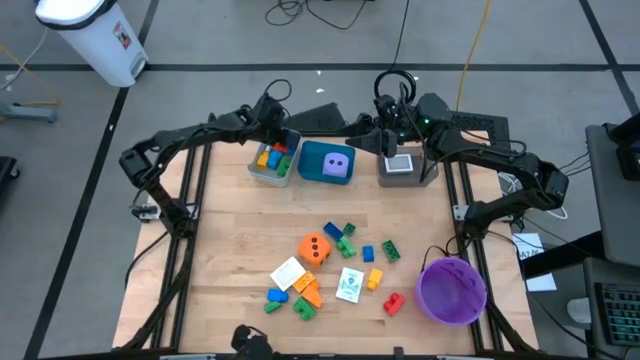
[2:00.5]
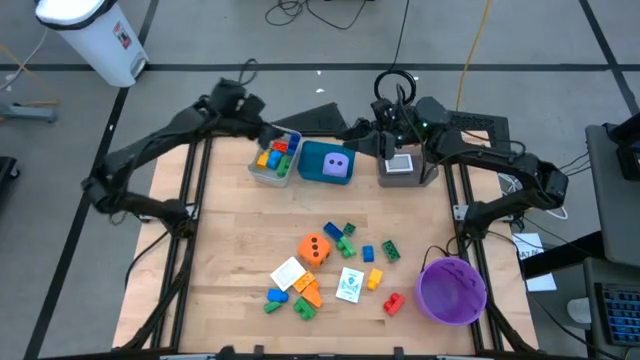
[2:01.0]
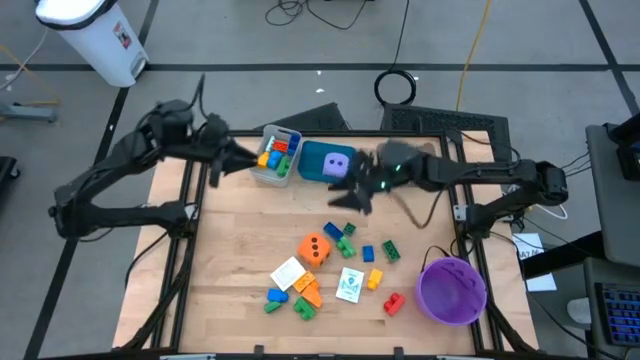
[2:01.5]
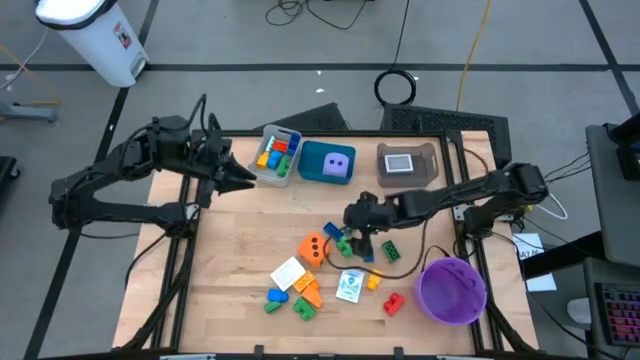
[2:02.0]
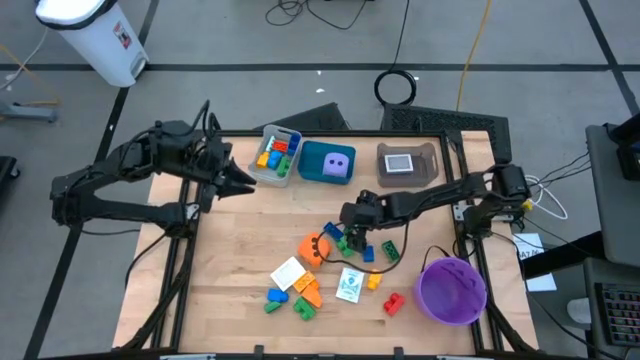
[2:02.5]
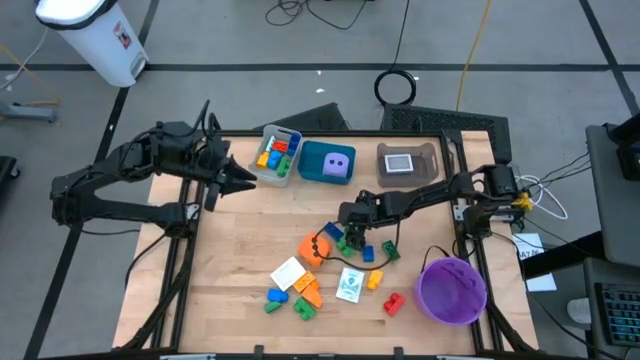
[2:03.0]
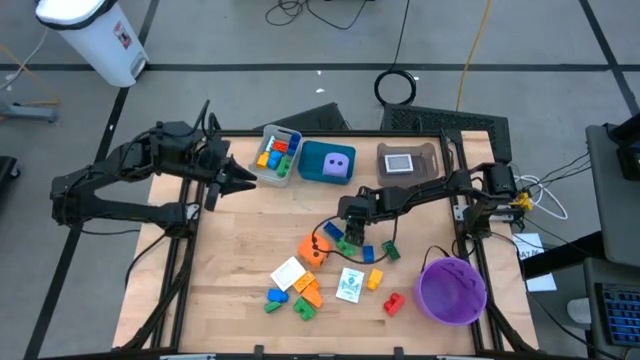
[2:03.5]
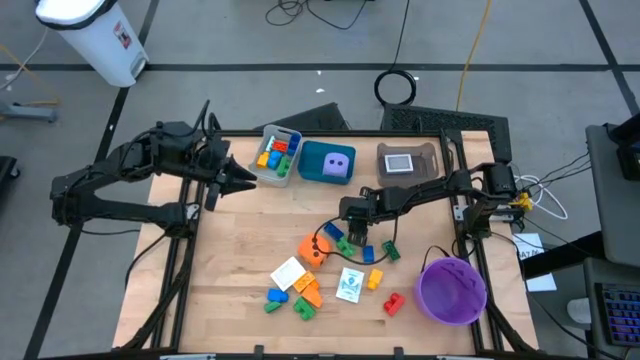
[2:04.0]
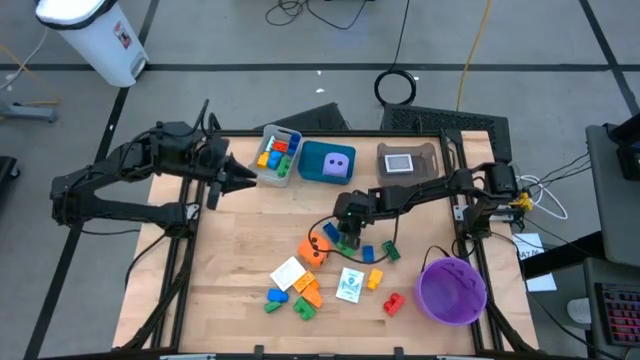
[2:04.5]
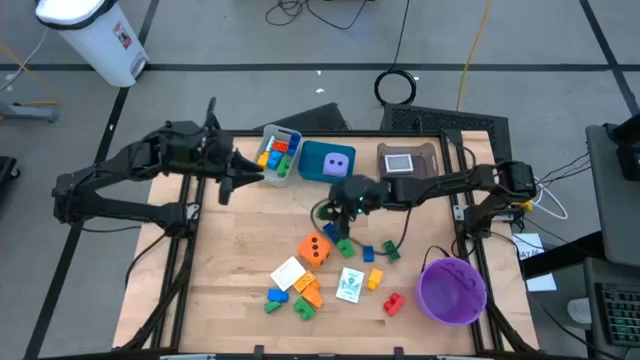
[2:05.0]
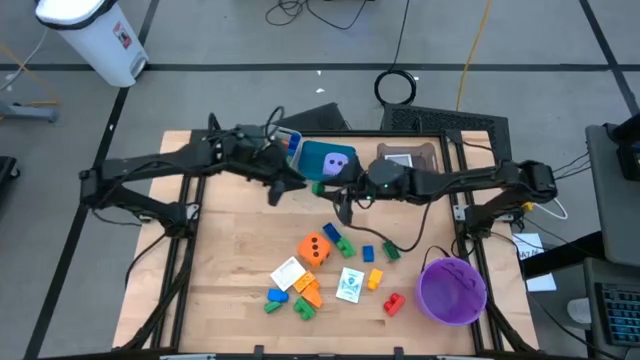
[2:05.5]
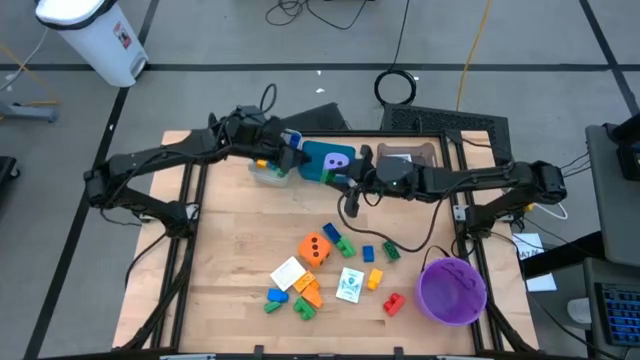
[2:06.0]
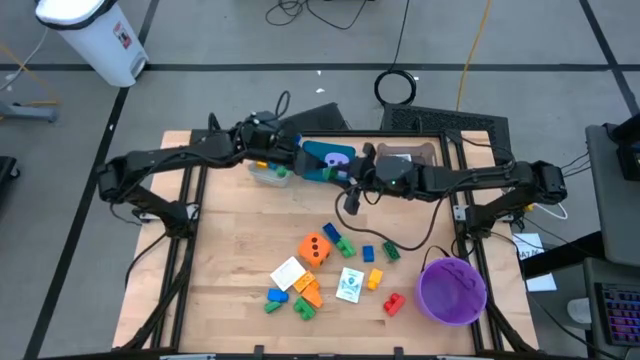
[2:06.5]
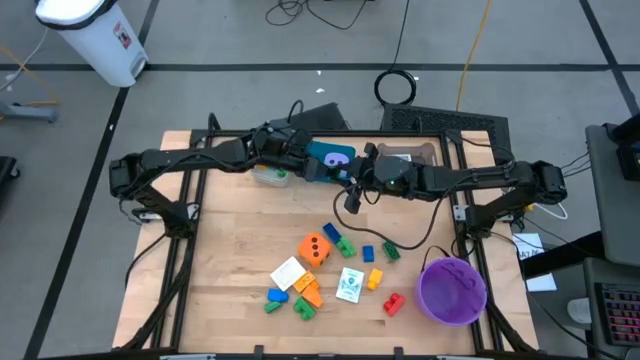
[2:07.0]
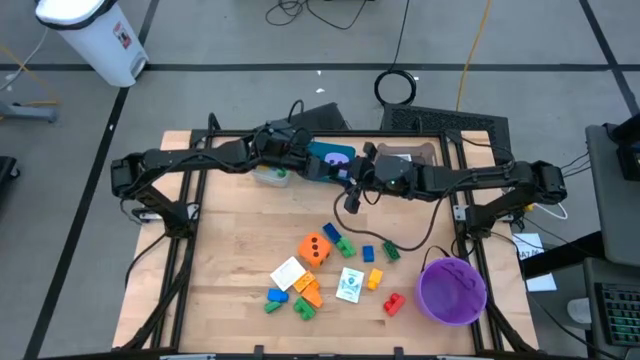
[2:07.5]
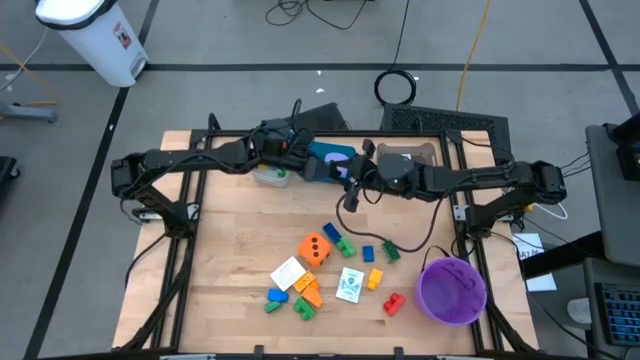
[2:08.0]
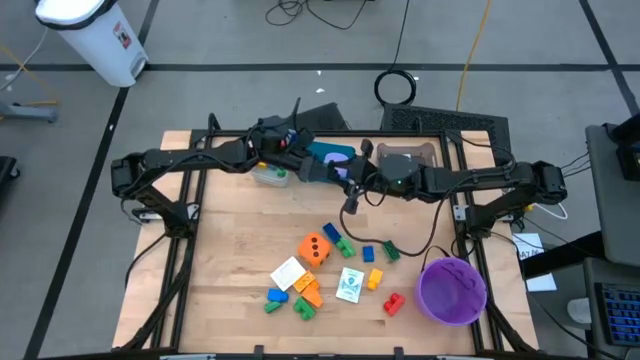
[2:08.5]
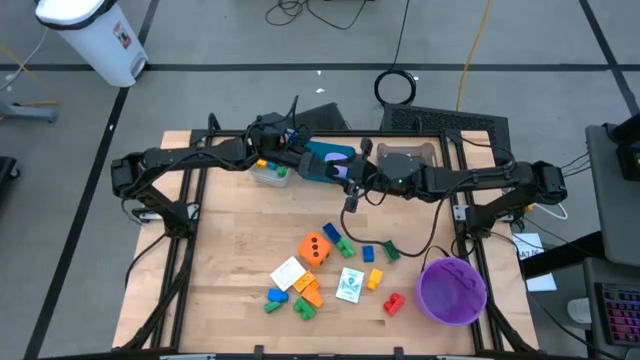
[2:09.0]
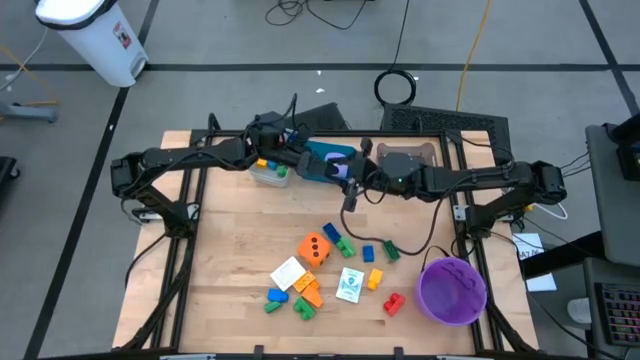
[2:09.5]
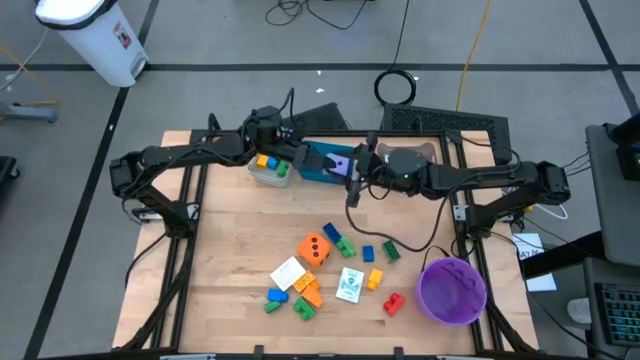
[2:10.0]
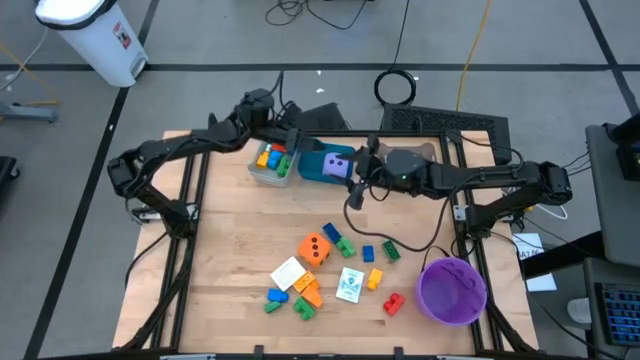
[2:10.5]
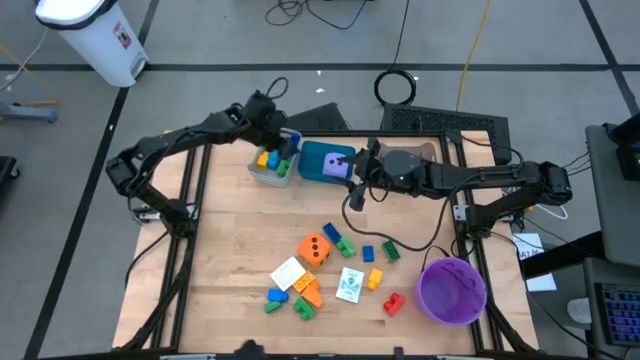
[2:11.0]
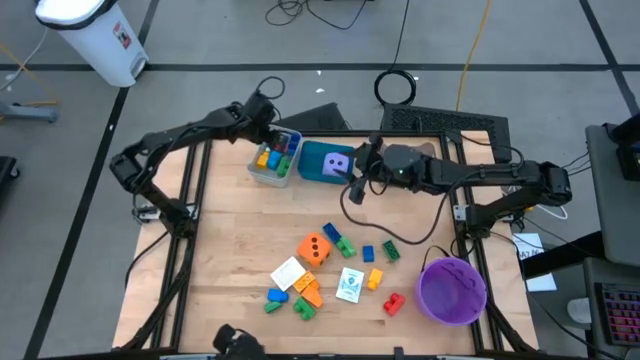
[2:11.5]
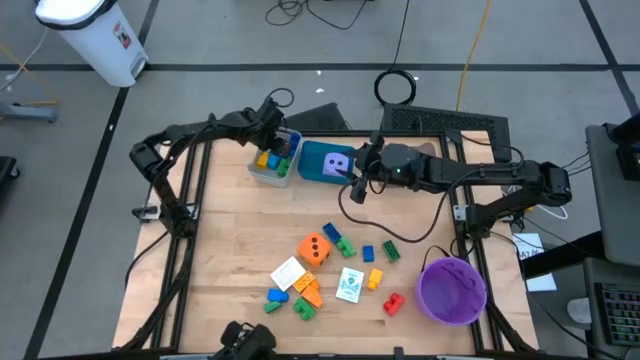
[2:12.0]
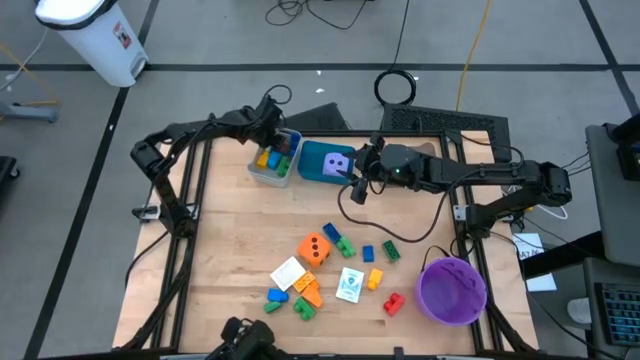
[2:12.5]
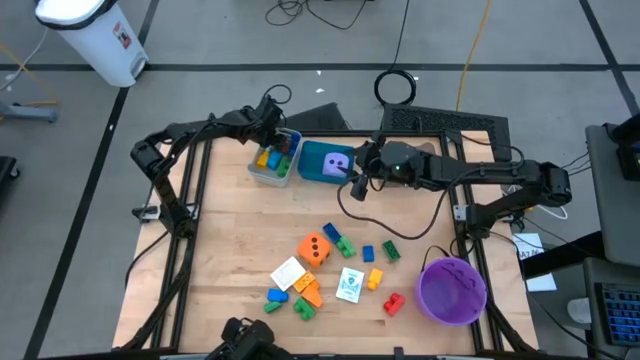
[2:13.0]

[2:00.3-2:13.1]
Task: Pick & Place Toys
Put the green game piece into the gray bin

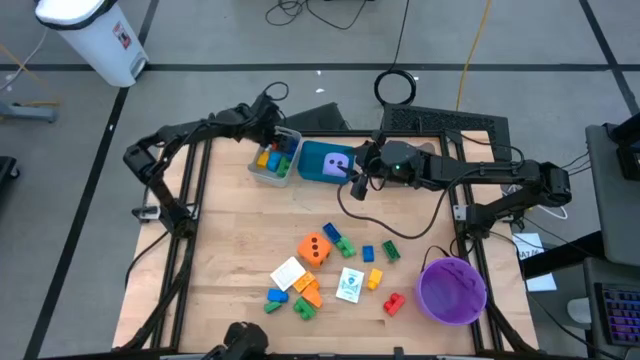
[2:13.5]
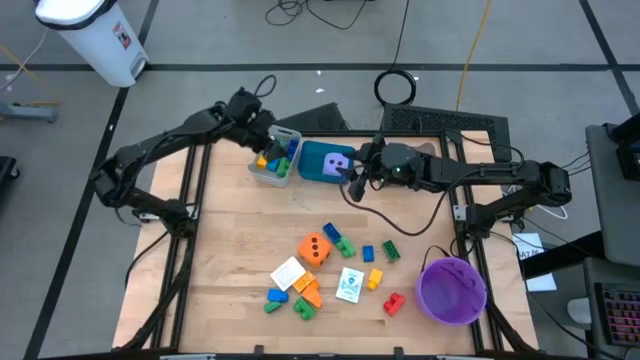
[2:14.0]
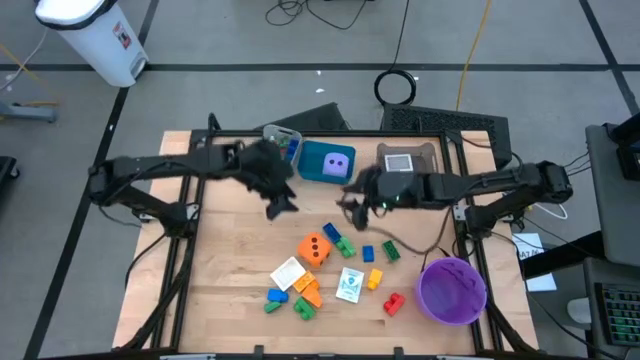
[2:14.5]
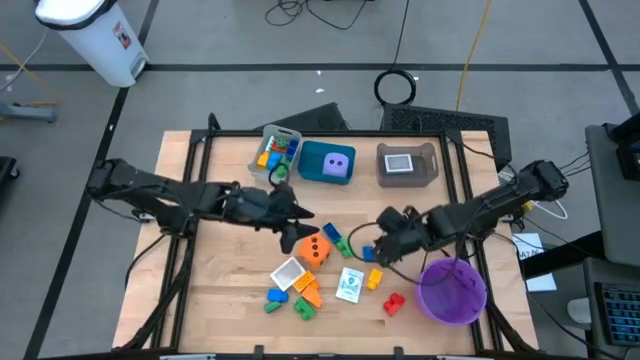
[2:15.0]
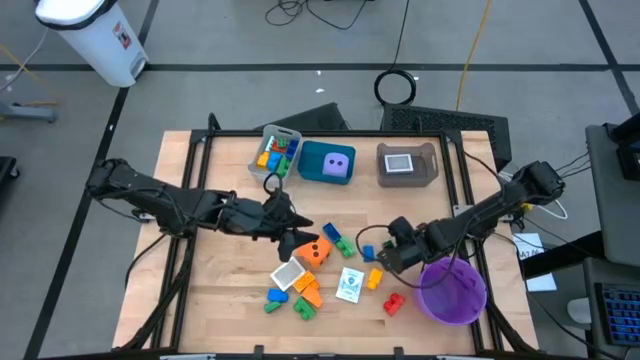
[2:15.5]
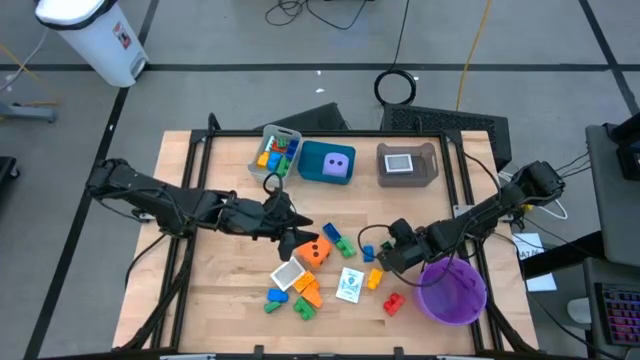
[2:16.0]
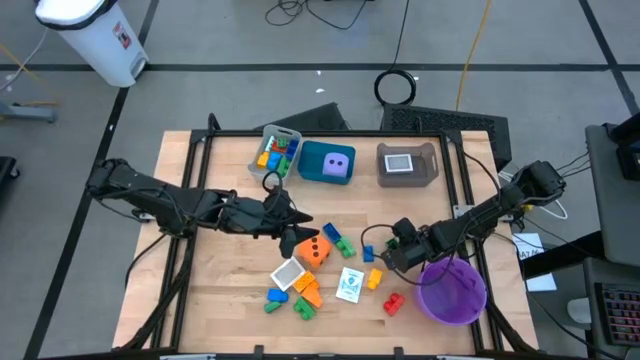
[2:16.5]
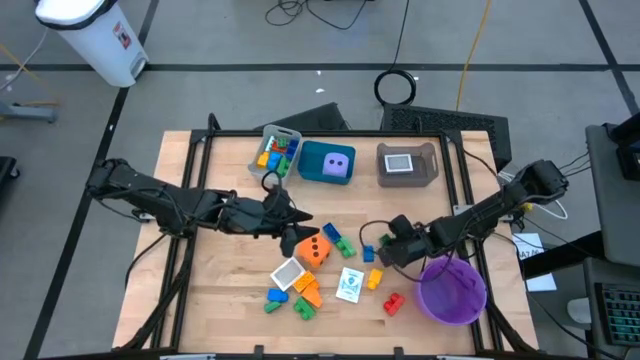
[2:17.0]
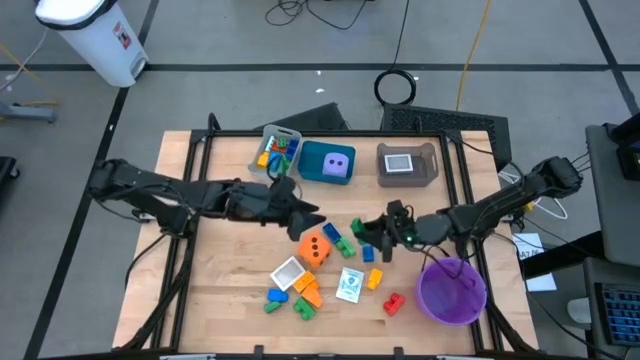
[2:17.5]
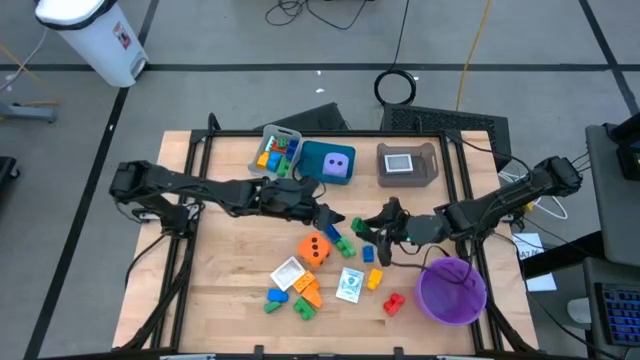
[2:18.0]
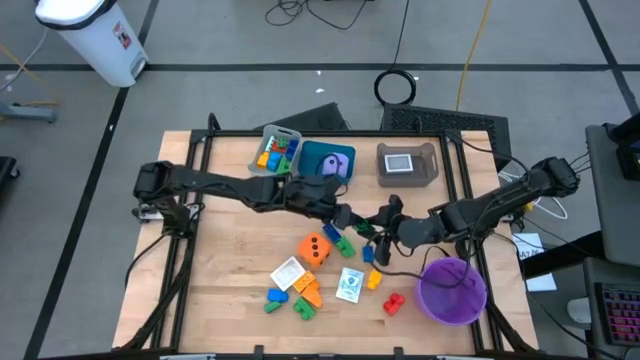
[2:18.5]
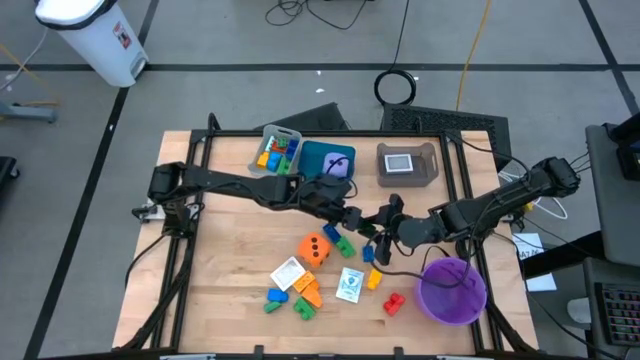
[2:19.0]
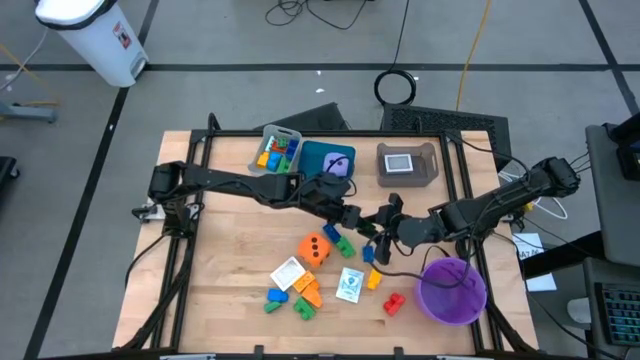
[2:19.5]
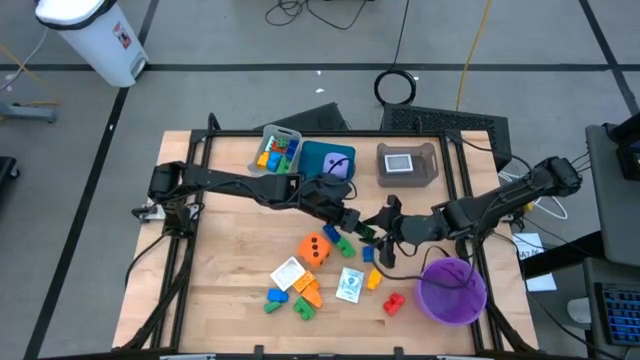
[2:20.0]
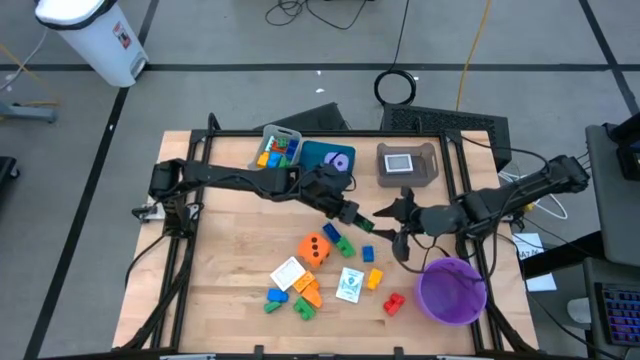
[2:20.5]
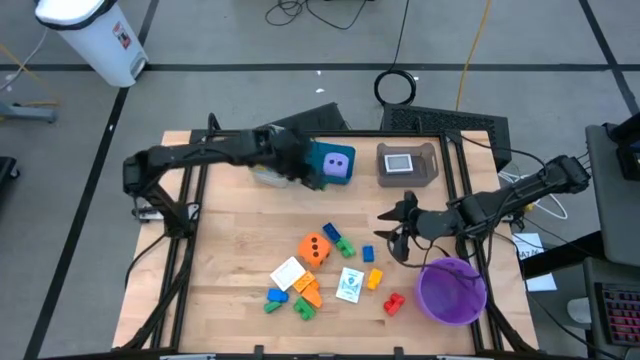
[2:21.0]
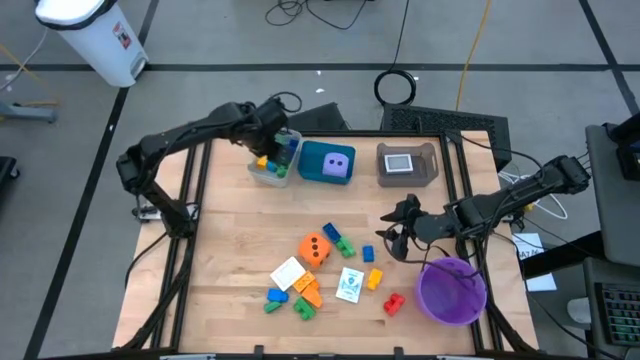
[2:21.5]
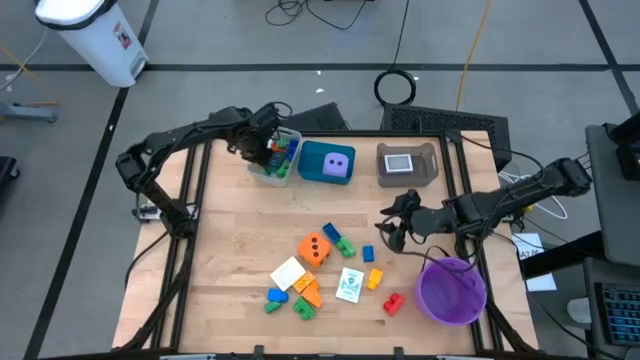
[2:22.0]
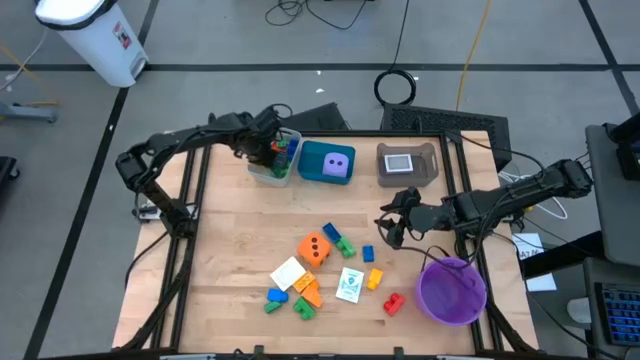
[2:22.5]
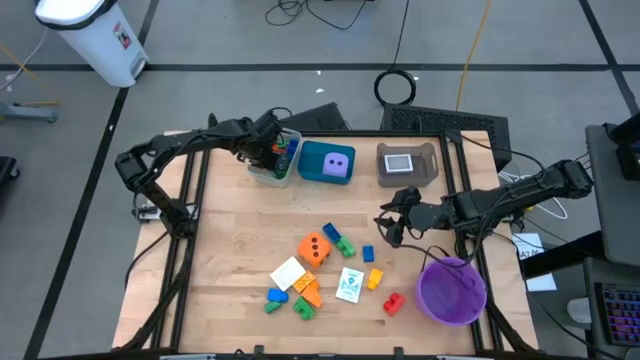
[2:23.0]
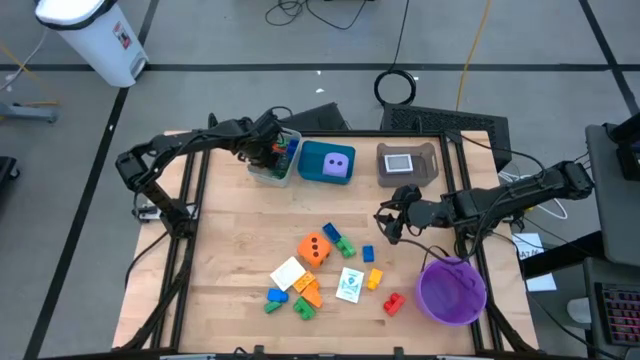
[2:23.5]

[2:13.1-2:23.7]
Put the green game piece into the gray bin
